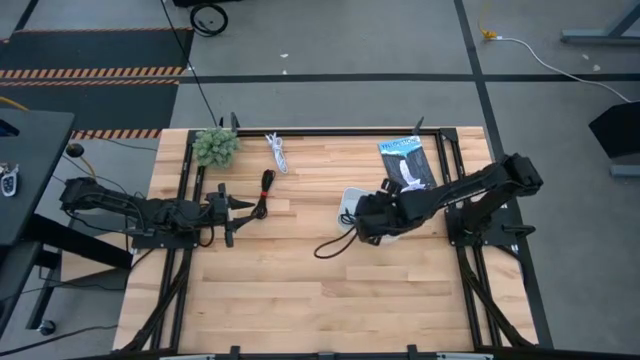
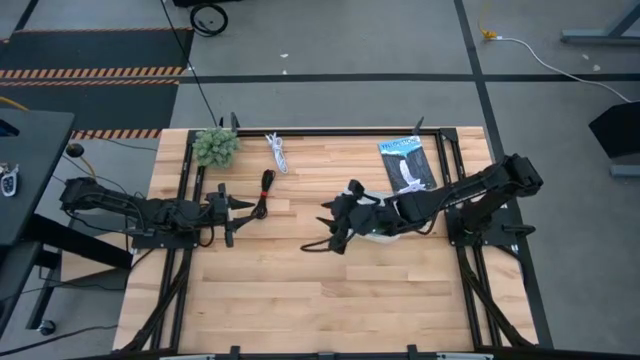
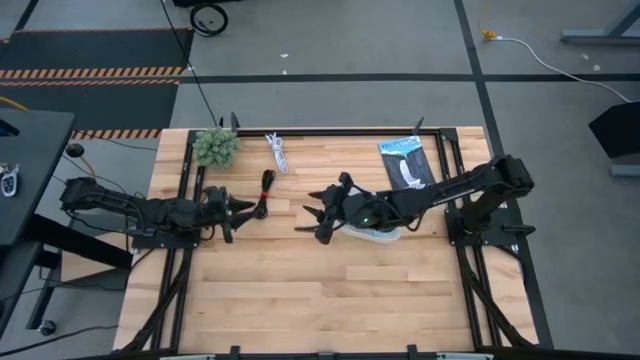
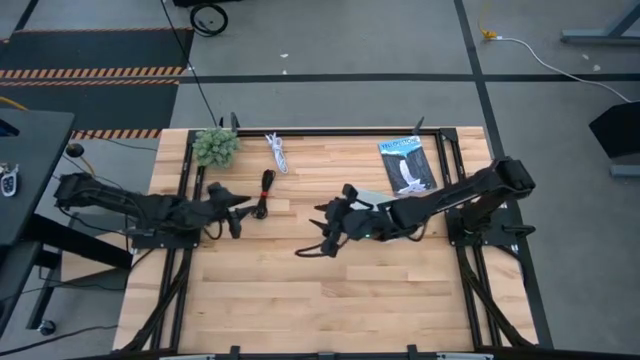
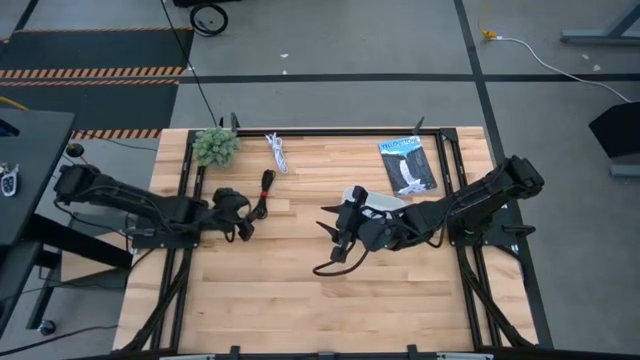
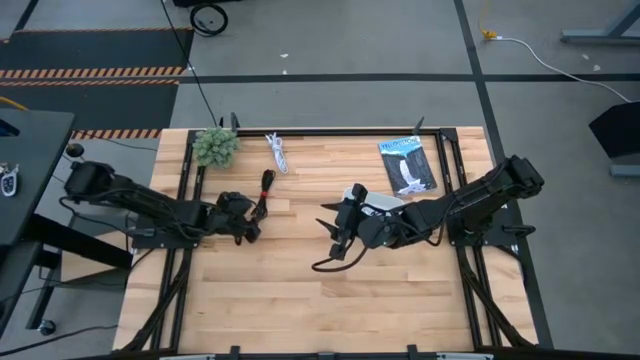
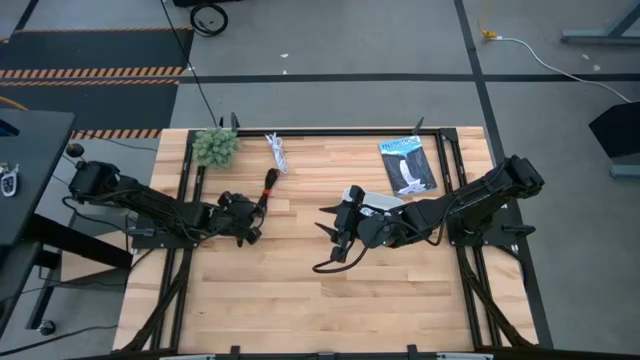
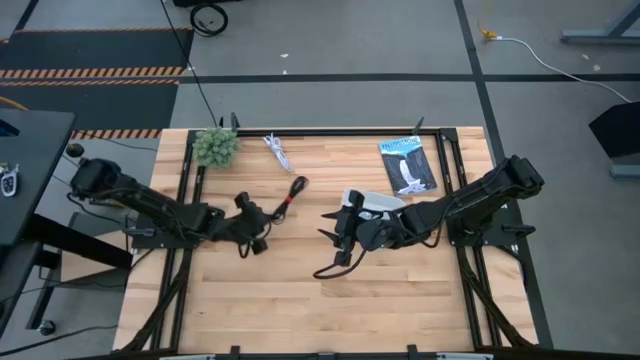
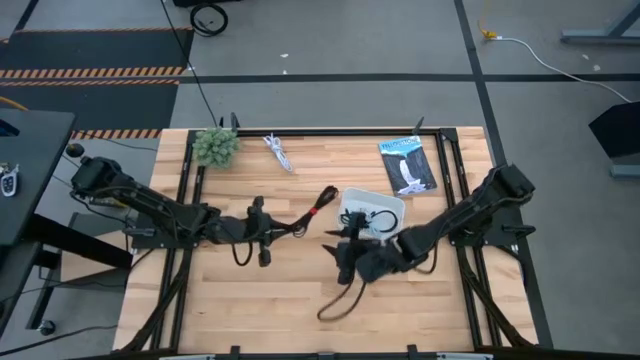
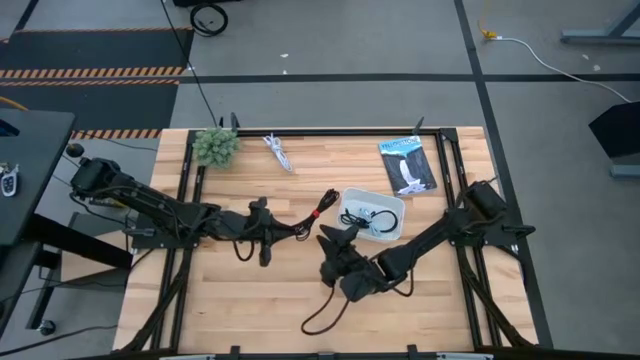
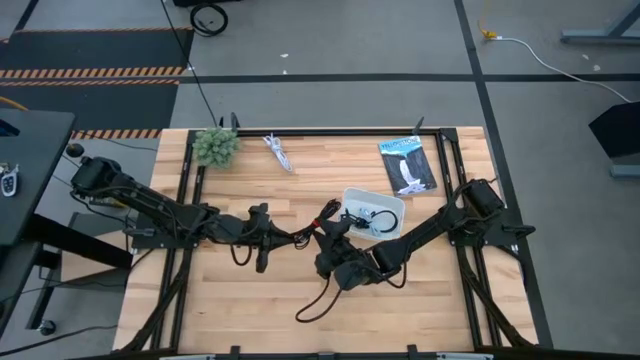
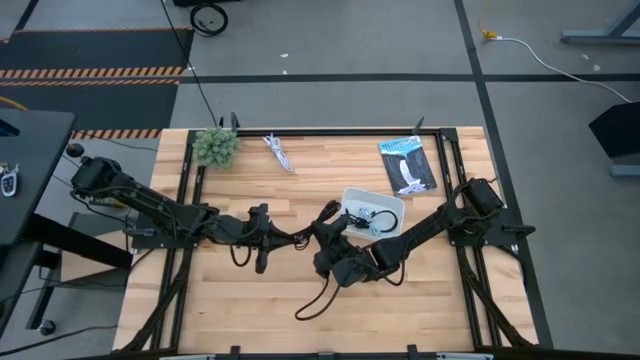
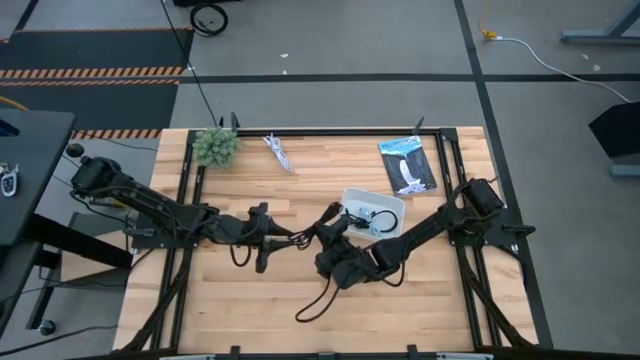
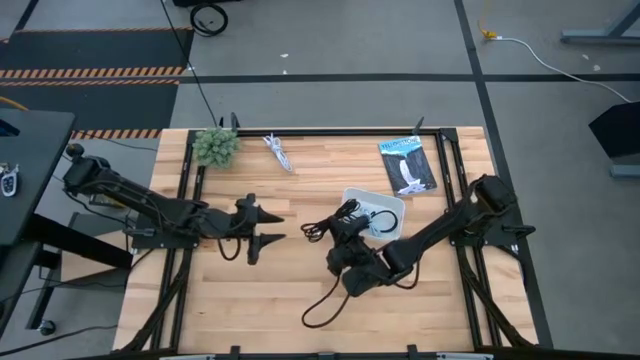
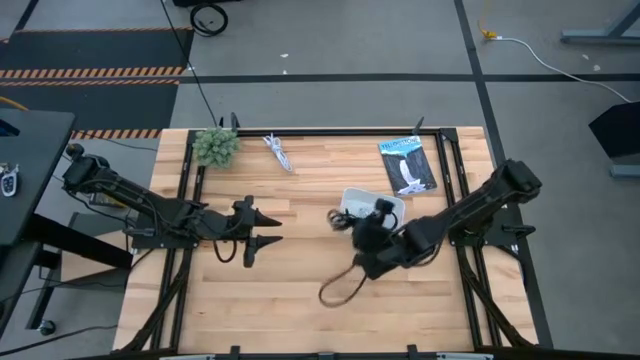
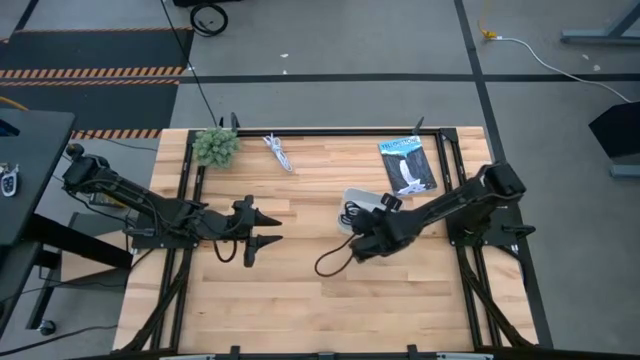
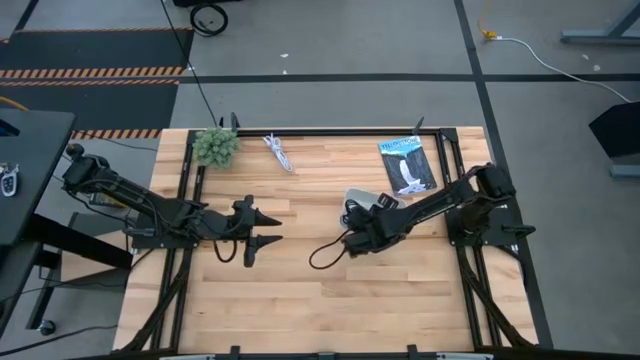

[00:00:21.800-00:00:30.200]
Task: Pick and place USB-C Cables
Put the black charger cable into the white bin

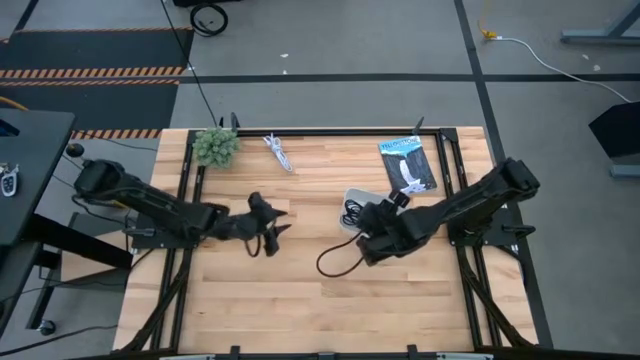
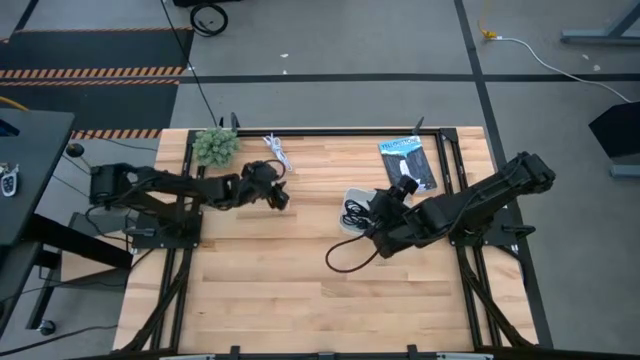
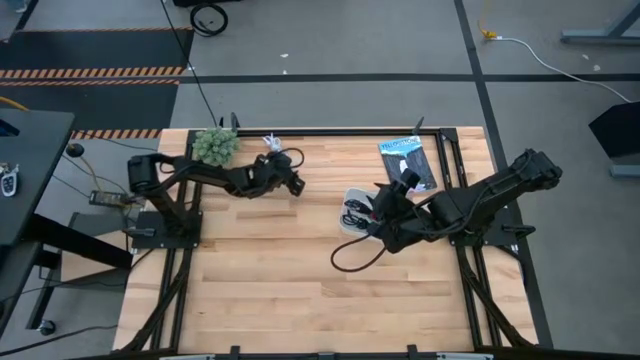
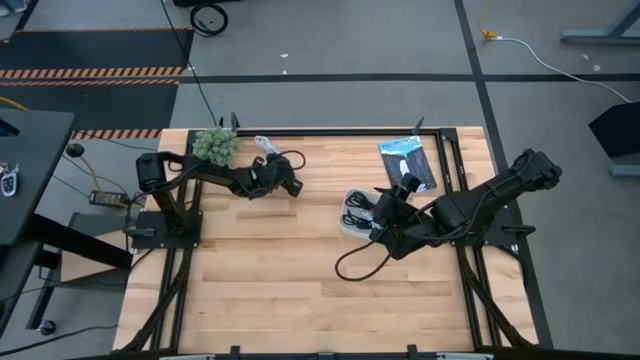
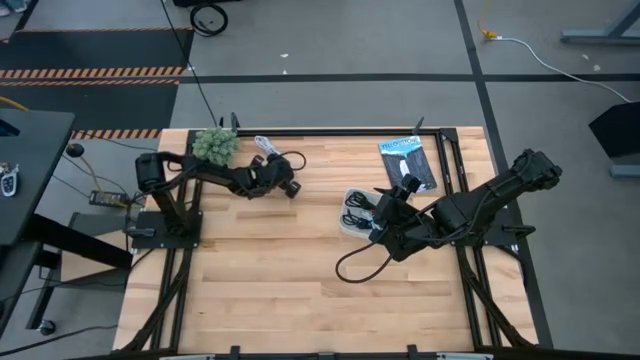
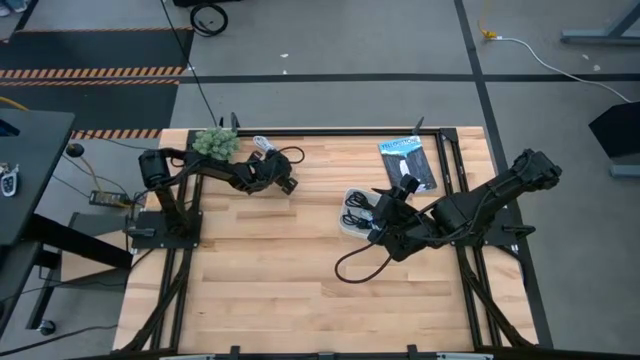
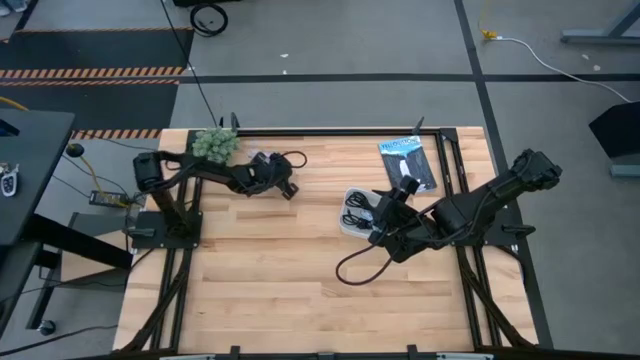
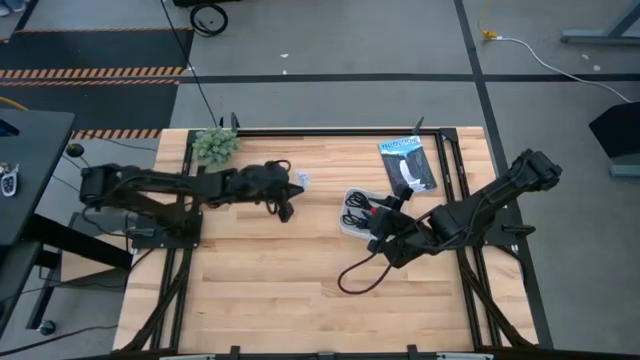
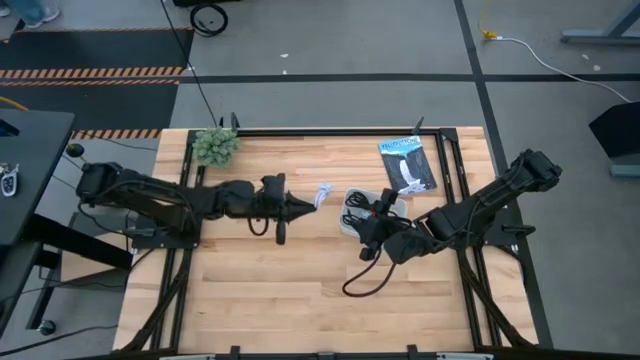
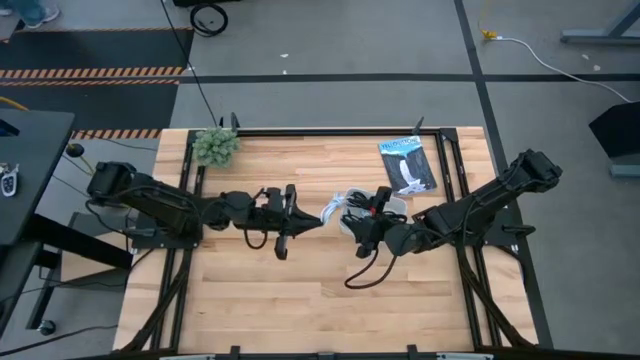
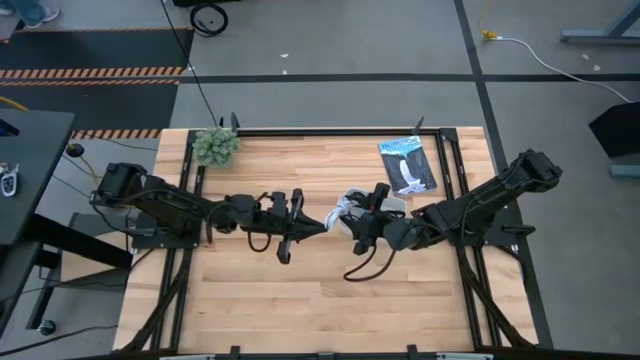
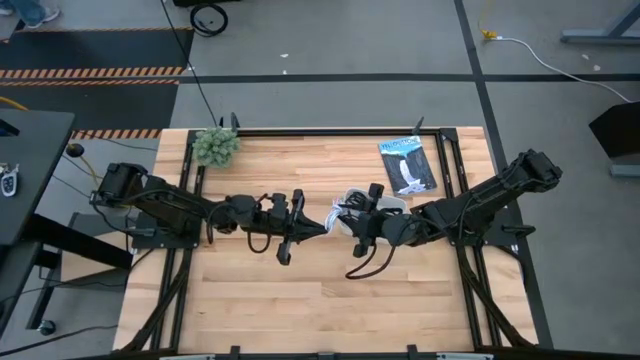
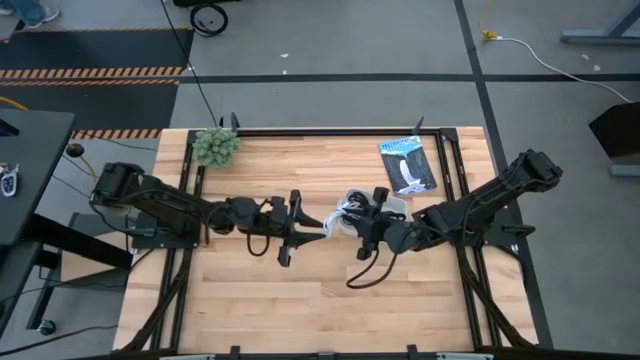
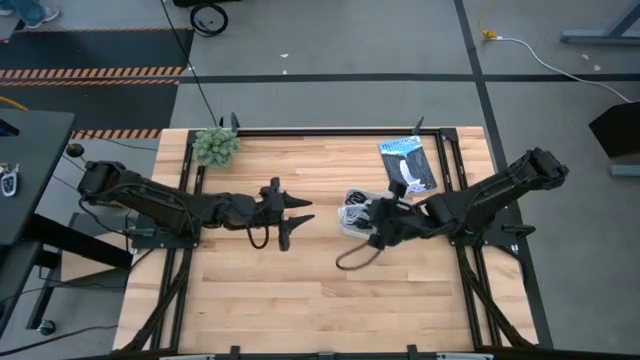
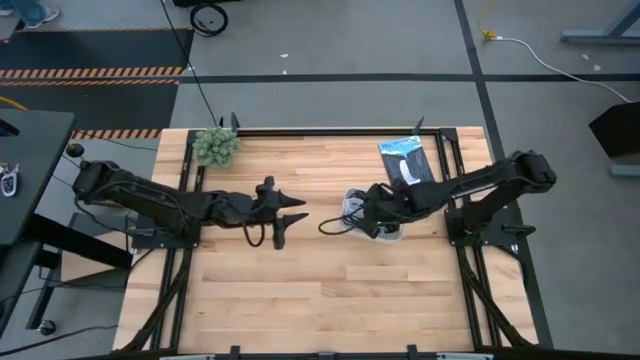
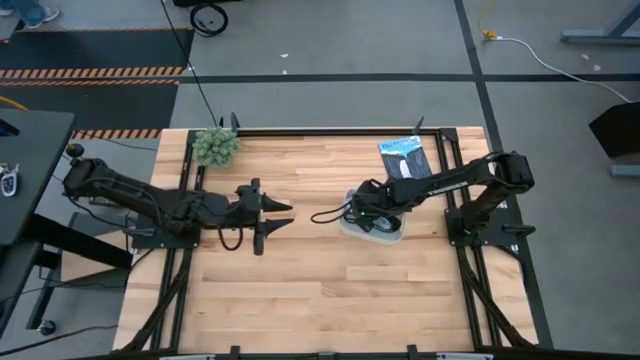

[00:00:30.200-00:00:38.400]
Put the white charger cable into the white bin

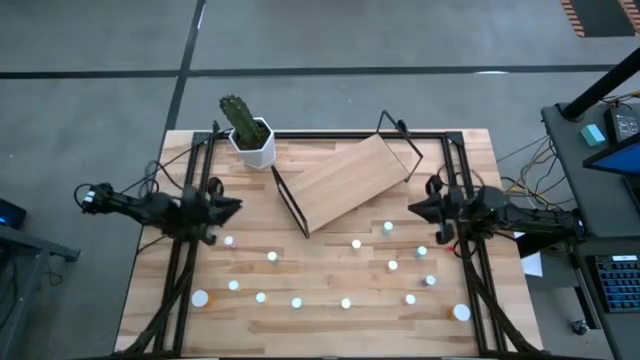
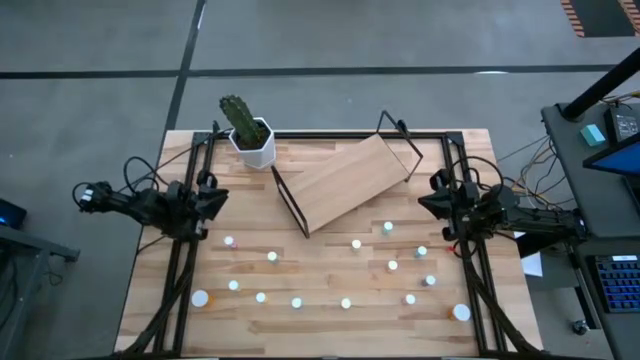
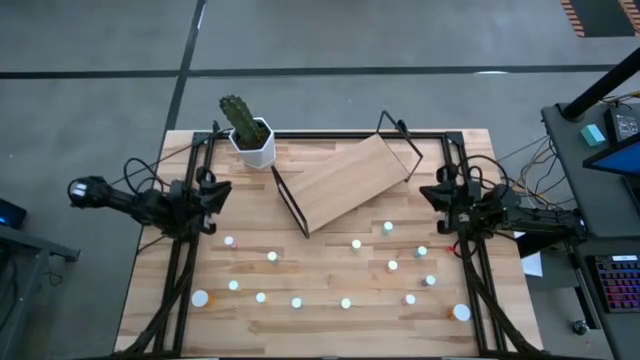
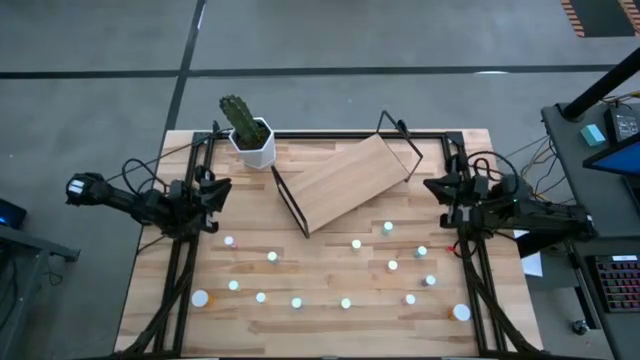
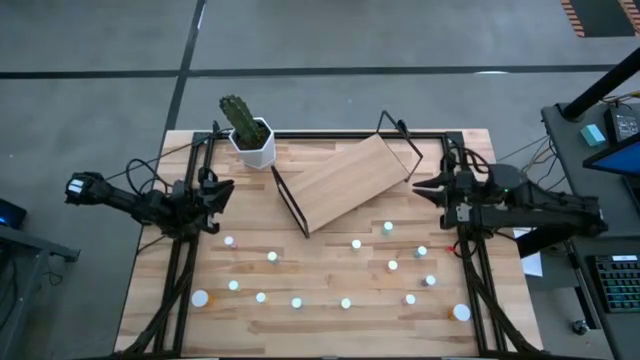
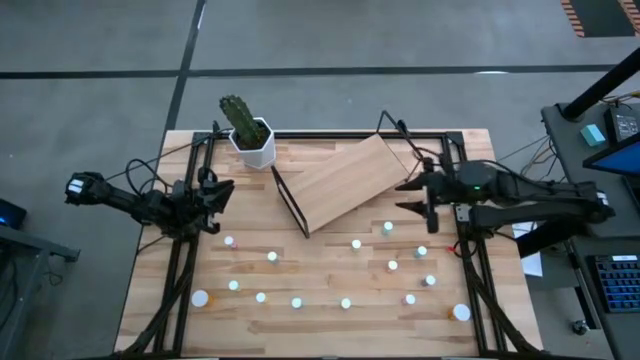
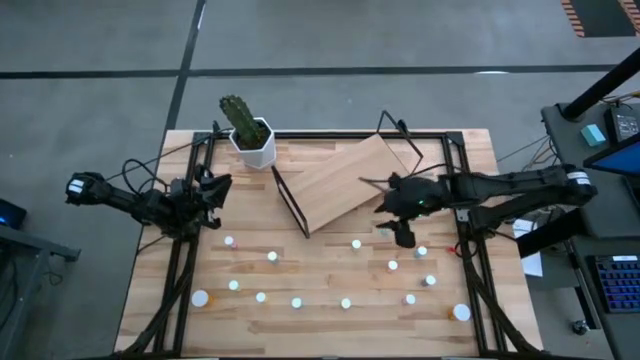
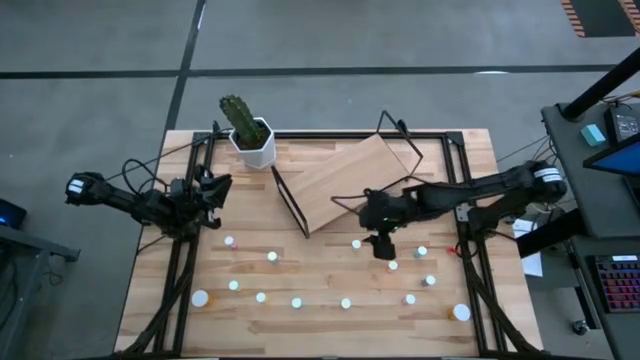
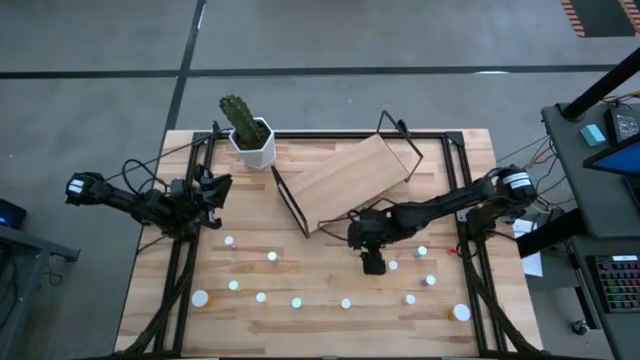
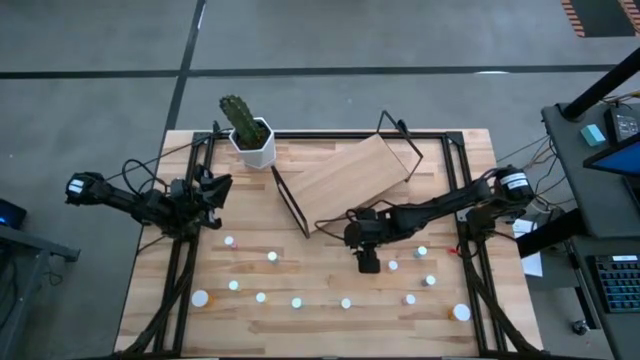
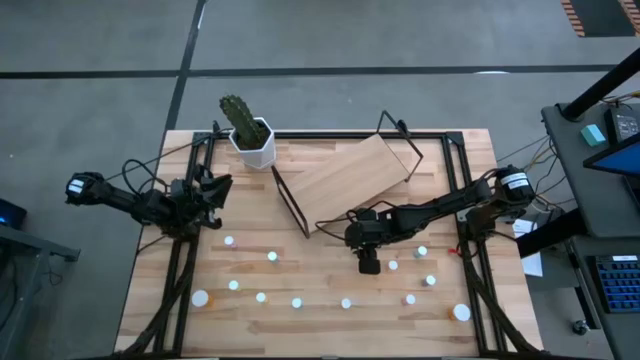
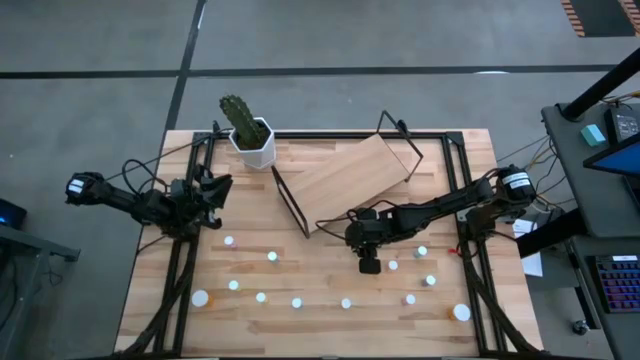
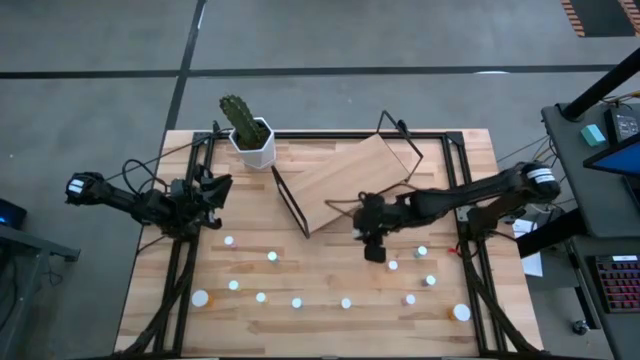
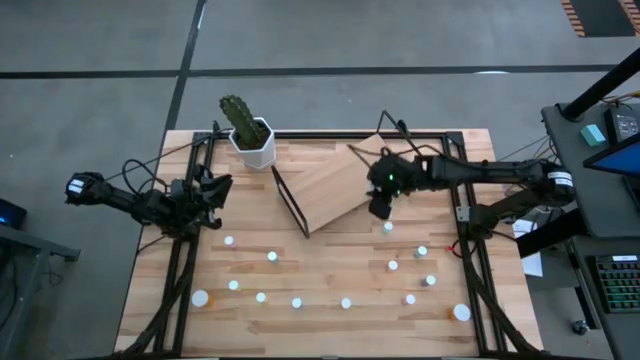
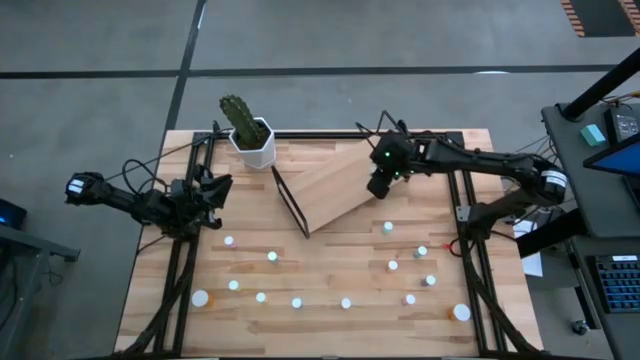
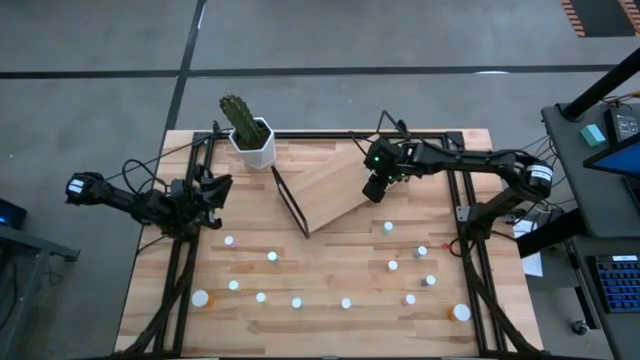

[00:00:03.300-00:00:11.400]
Task: Pick and place medicine bottles onto shelf by color
Put the yellow pill bottle on the shelf
